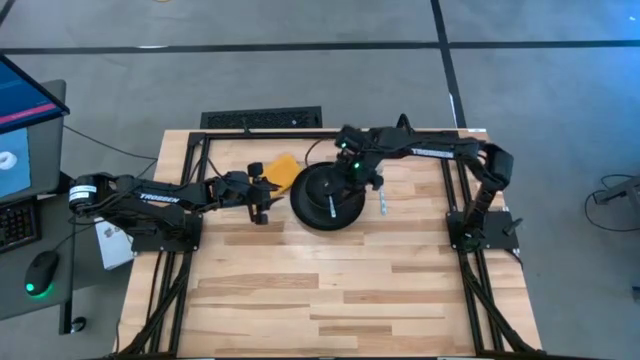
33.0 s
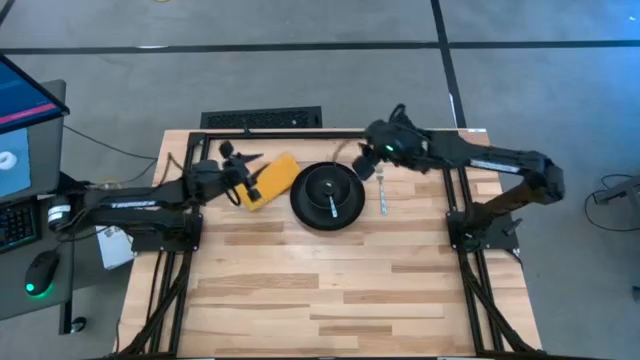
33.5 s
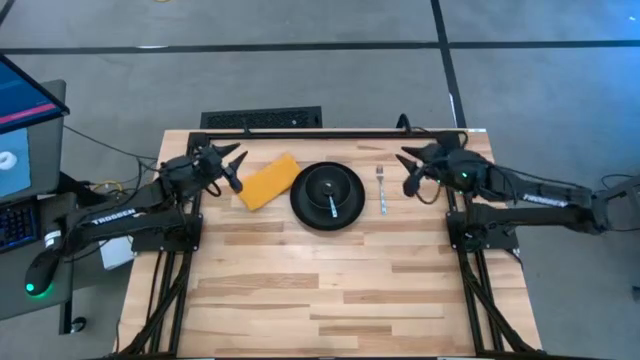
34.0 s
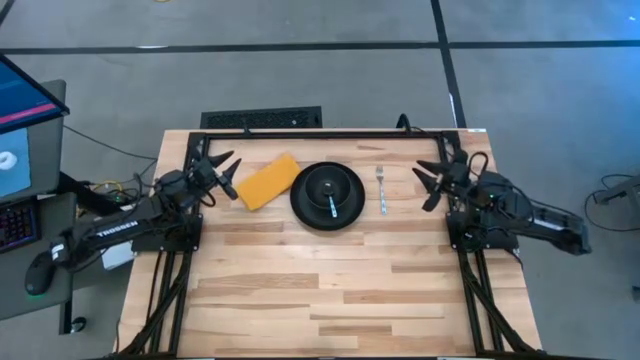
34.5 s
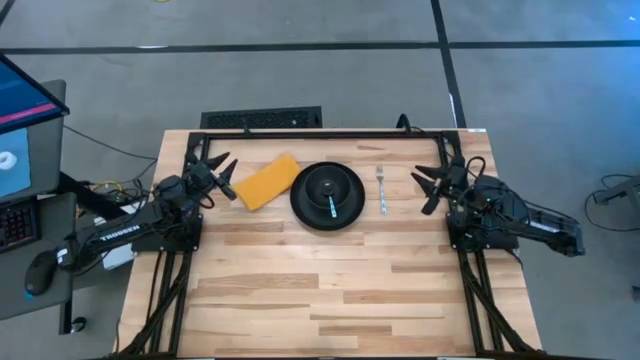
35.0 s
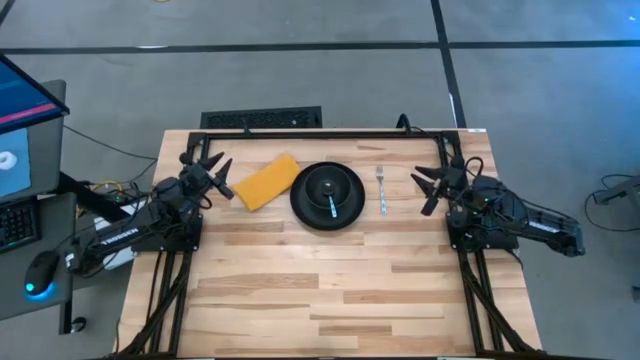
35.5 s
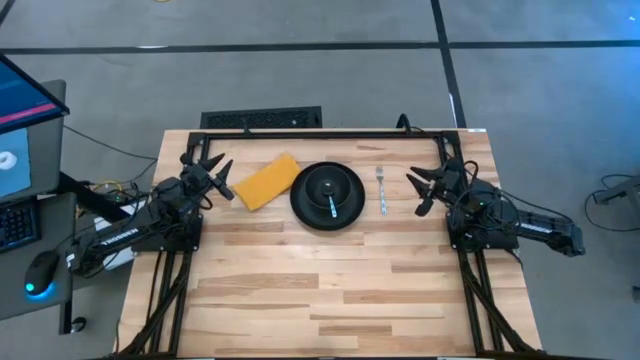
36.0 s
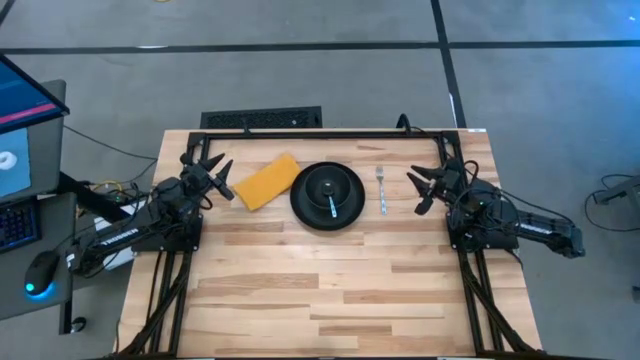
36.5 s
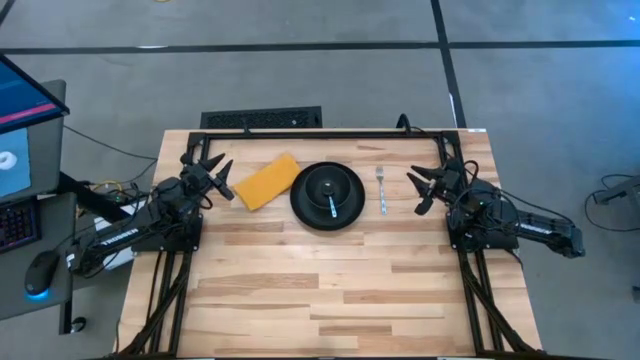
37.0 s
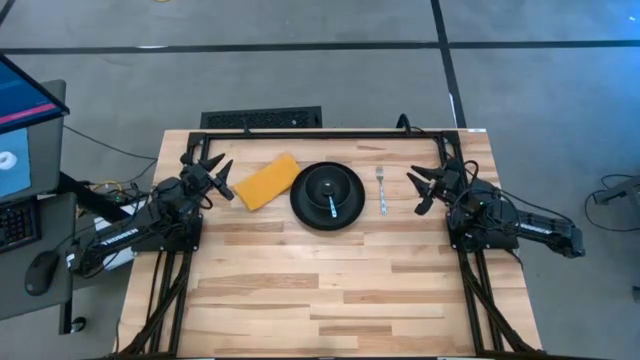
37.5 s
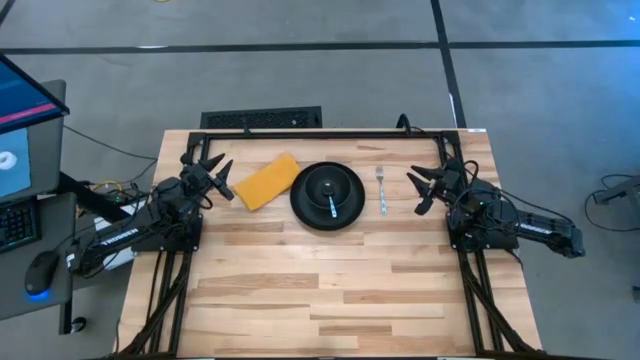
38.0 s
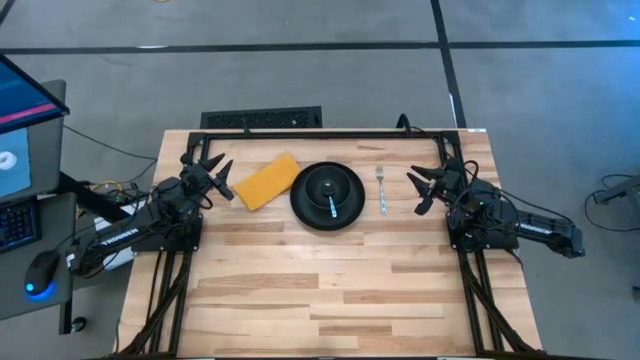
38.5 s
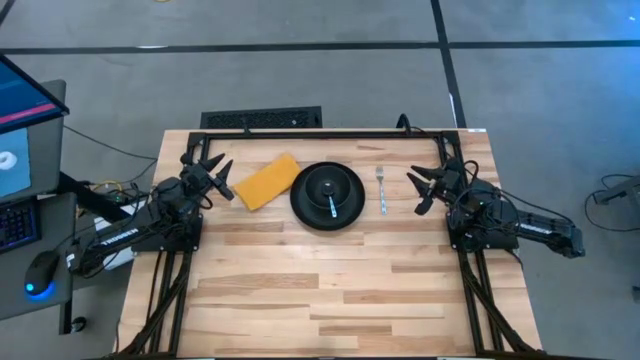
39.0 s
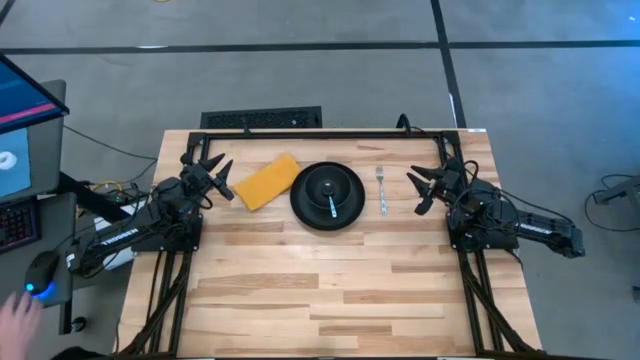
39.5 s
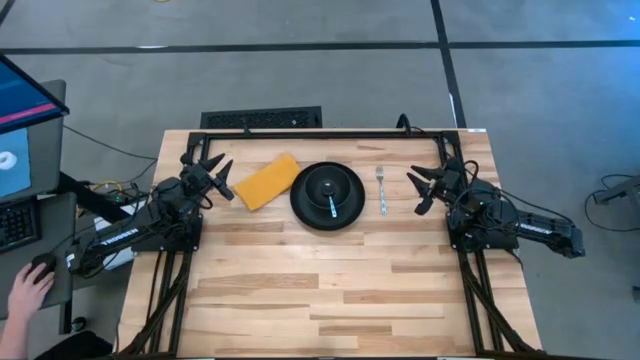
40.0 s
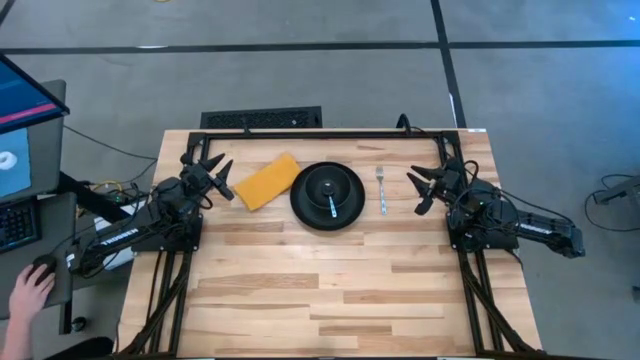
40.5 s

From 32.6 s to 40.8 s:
Task: Set table place
Return to Home Position

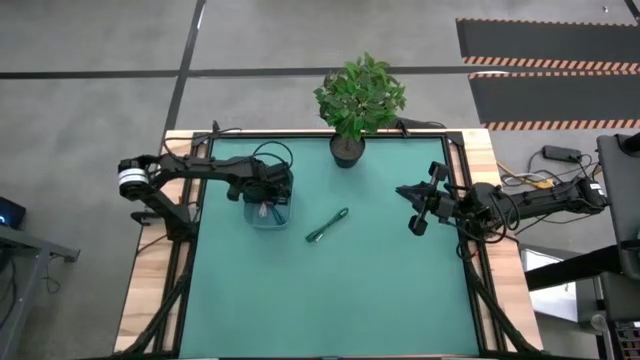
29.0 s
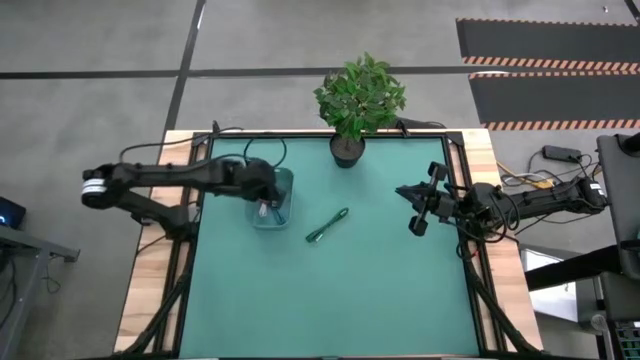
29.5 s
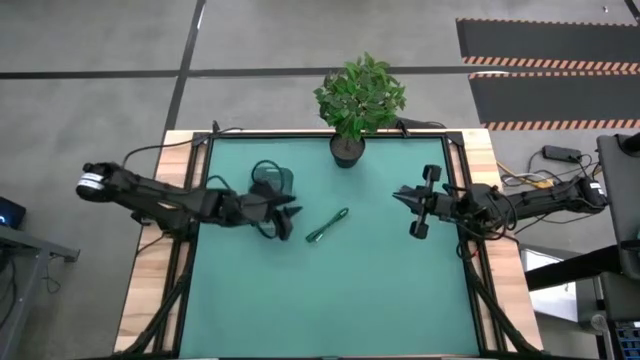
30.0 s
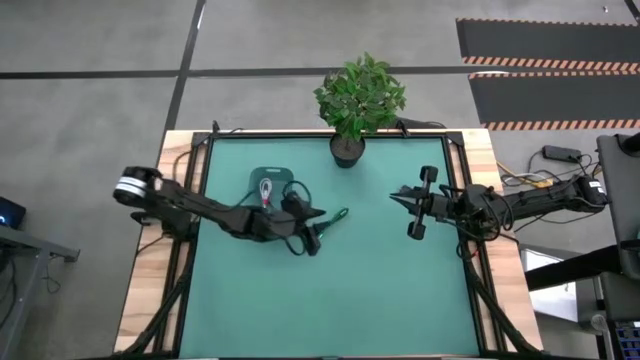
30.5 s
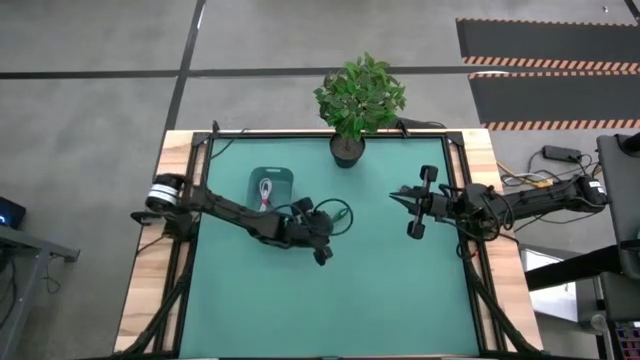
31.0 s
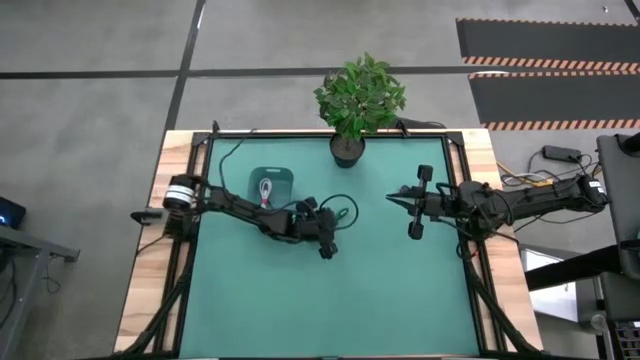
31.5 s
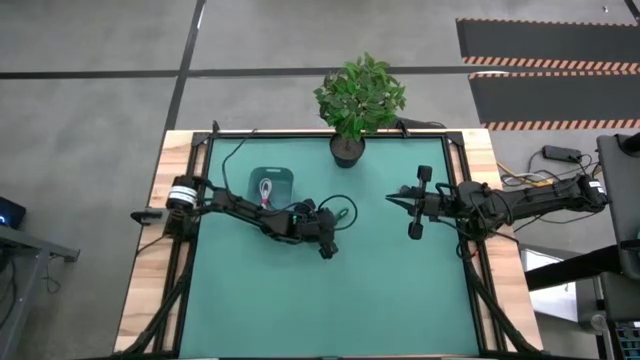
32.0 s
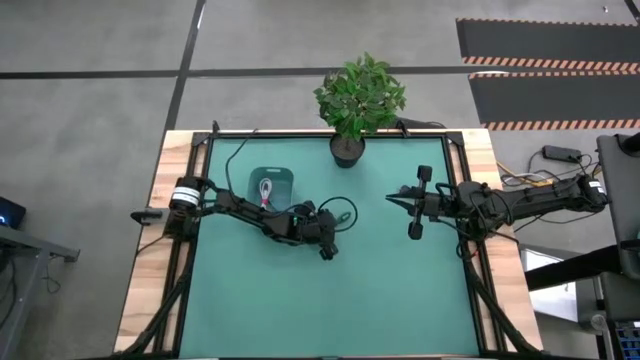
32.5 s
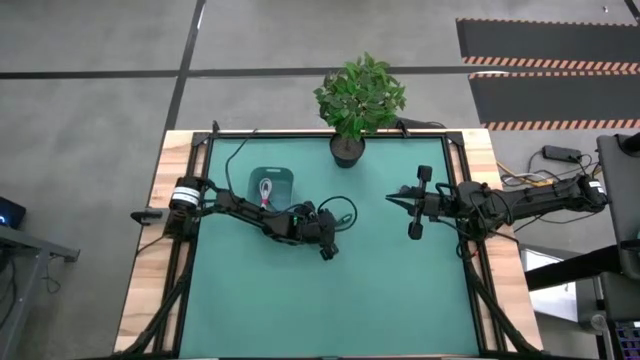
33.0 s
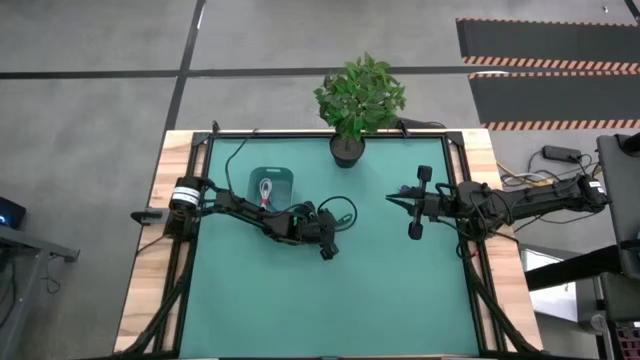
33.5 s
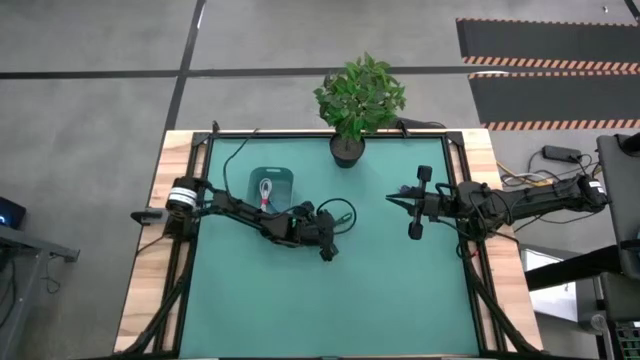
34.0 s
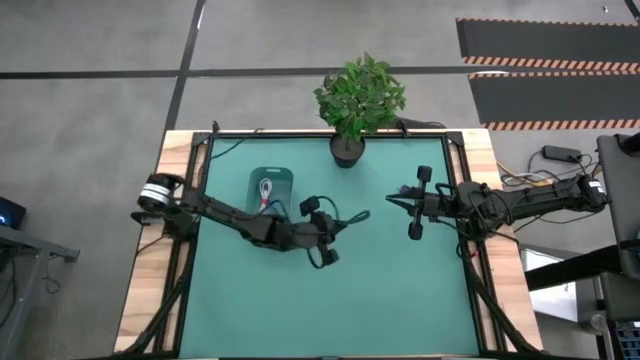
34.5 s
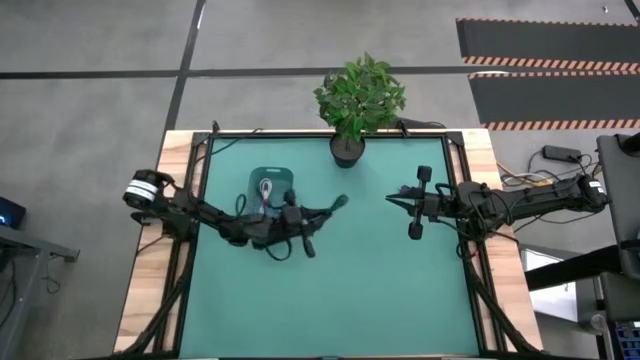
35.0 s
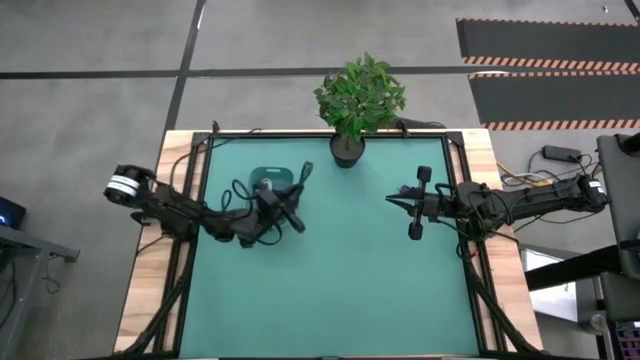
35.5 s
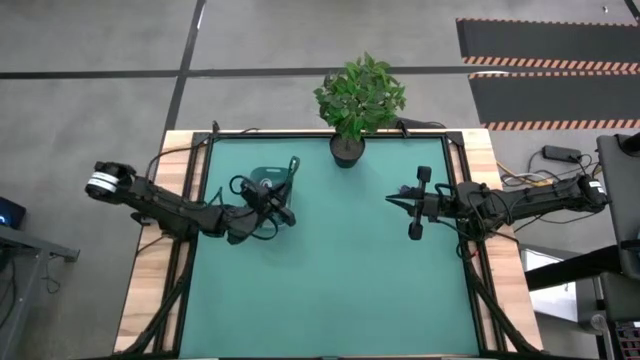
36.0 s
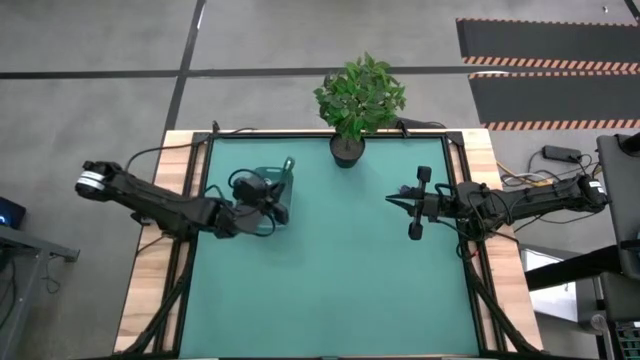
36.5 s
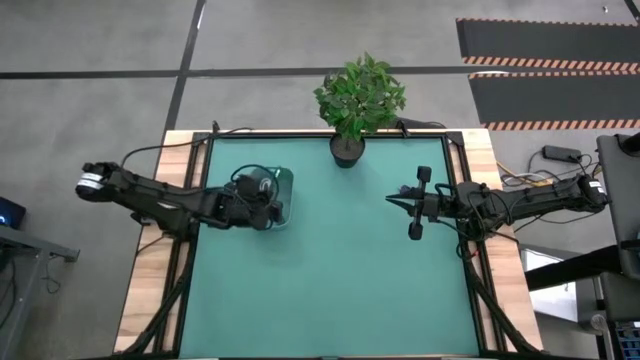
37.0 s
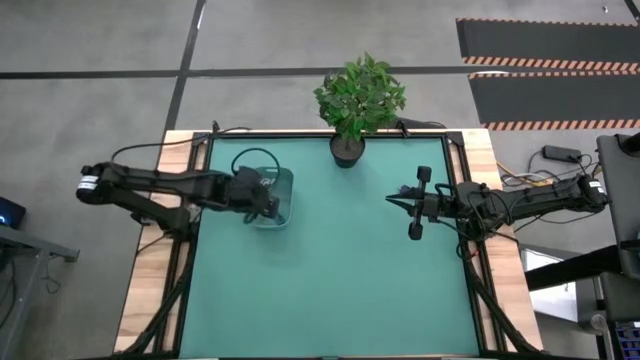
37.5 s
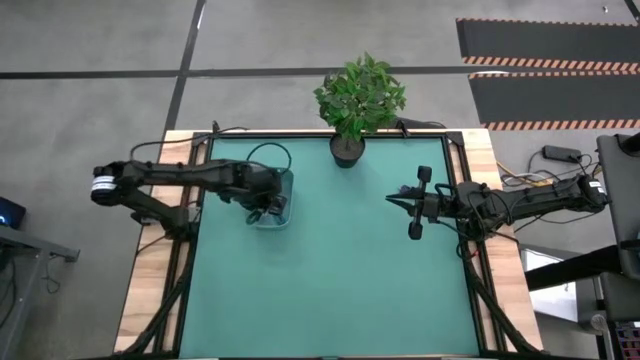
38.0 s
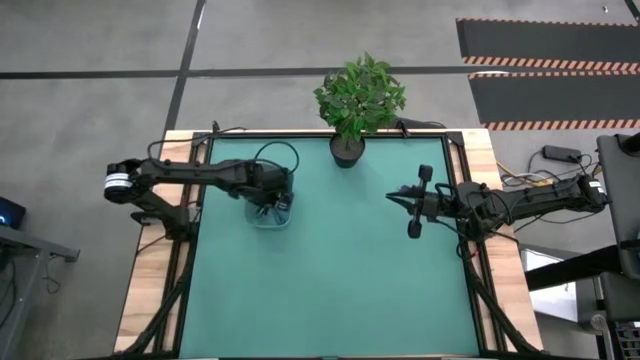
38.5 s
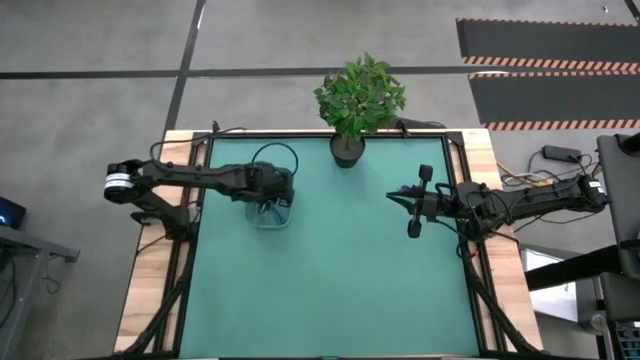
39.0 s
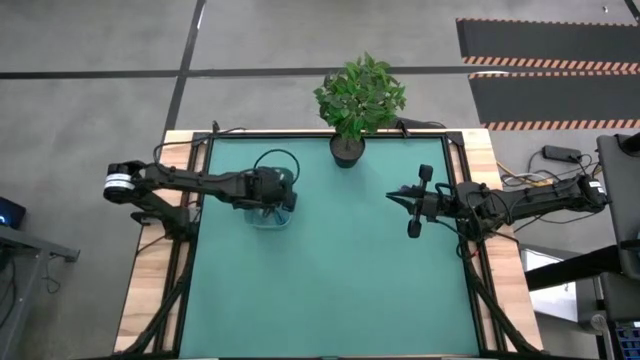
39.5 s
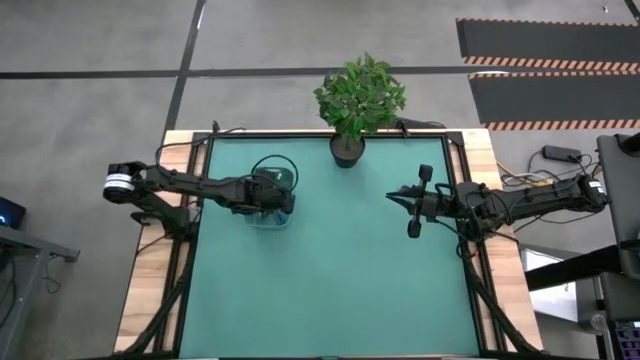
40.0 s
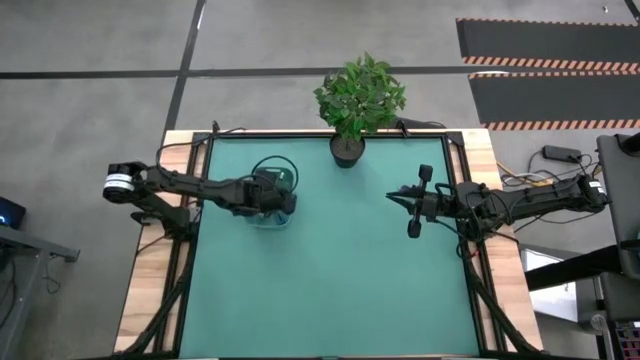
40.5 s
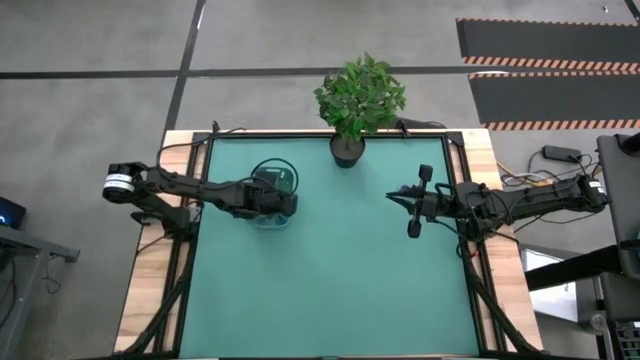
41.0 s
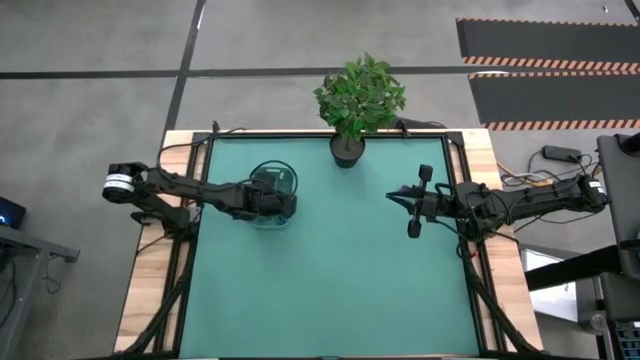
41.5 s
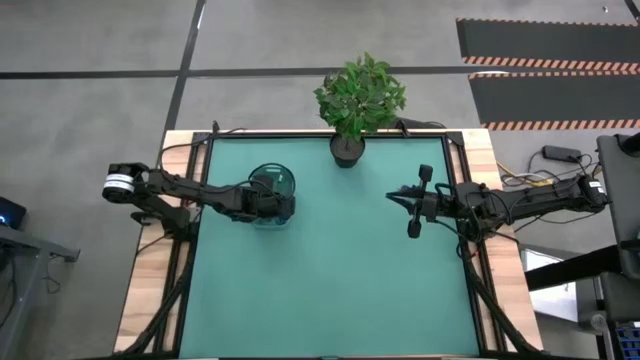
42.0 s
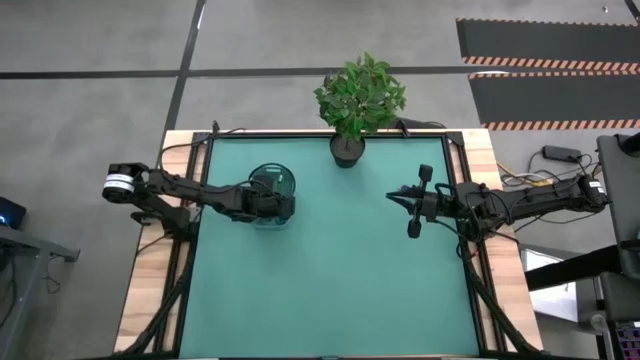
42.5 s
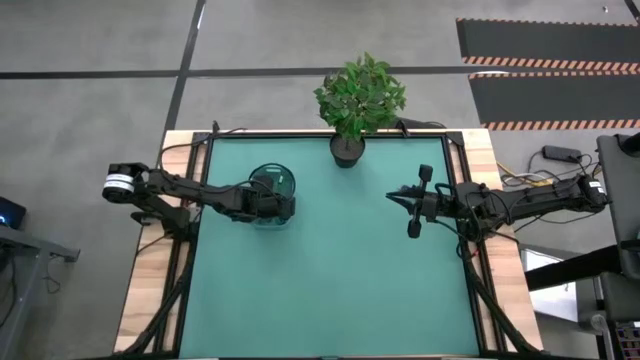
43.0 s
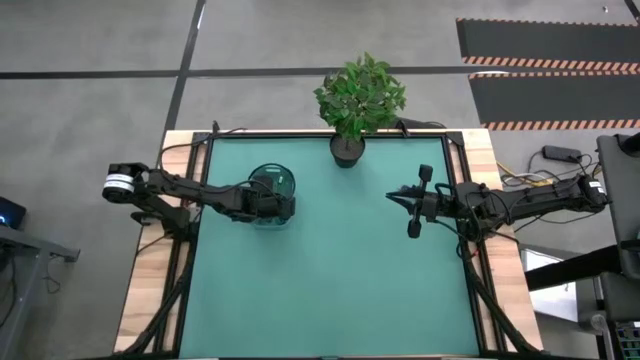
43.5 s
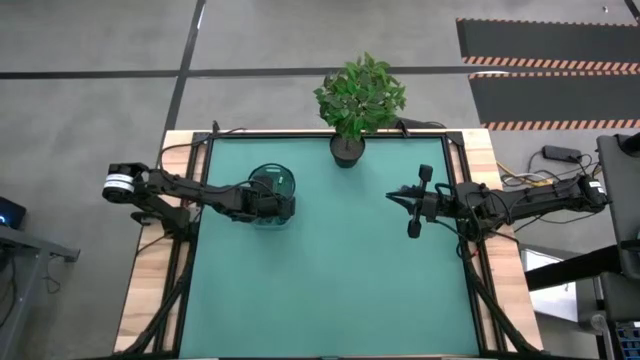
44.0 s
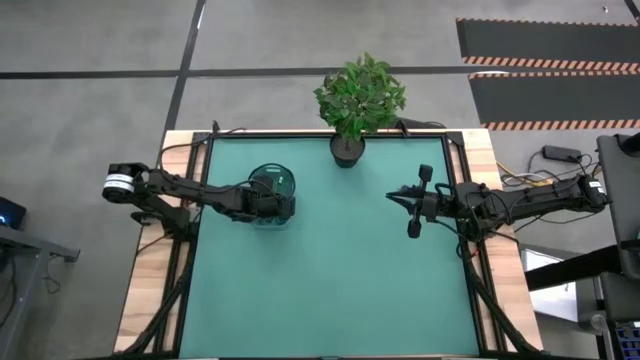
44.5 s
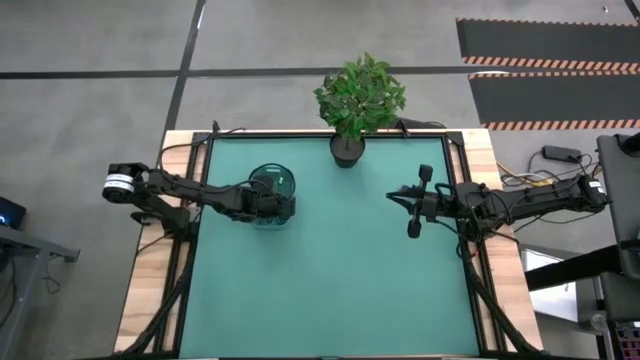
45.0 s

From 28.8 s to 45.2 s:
Task: Pick and place USB-C Cables
Put the black green charger cable into the green bin
